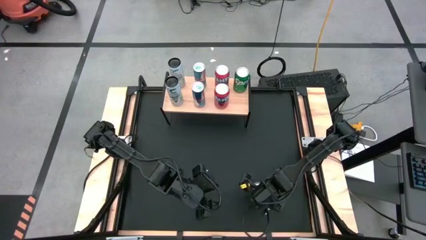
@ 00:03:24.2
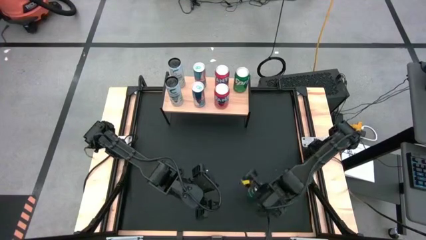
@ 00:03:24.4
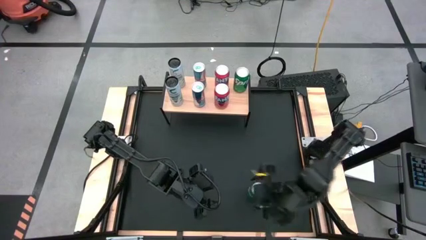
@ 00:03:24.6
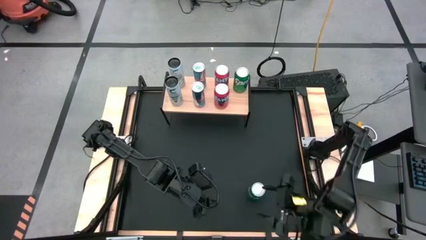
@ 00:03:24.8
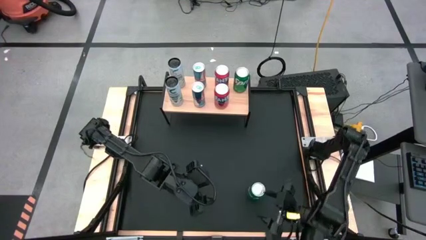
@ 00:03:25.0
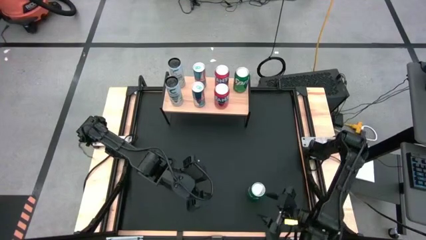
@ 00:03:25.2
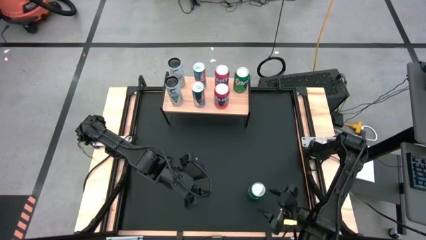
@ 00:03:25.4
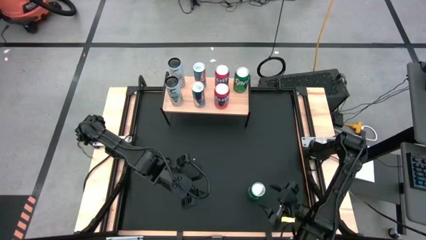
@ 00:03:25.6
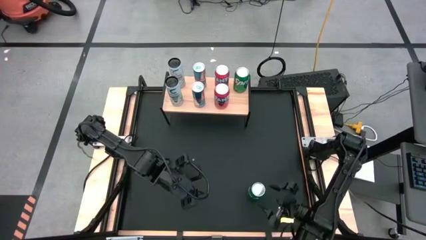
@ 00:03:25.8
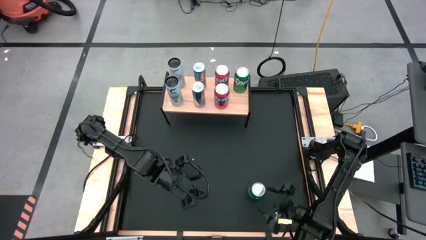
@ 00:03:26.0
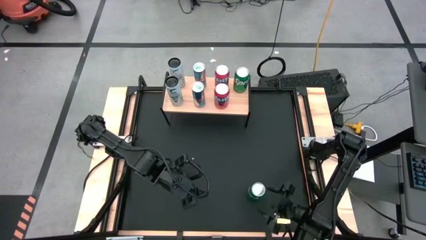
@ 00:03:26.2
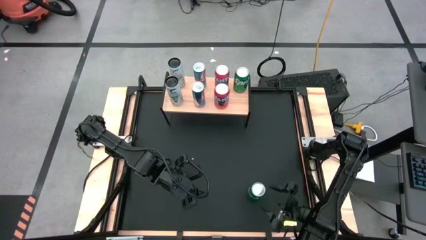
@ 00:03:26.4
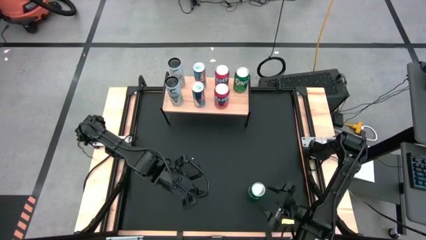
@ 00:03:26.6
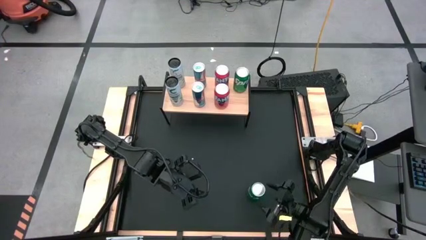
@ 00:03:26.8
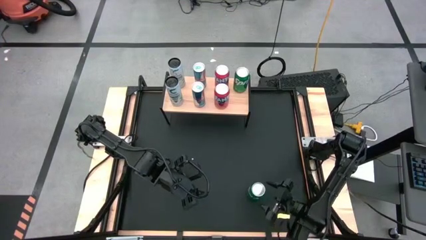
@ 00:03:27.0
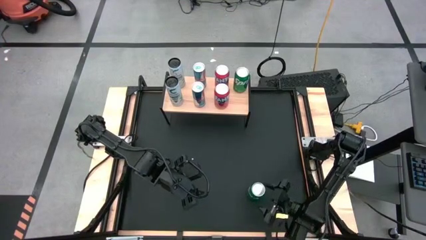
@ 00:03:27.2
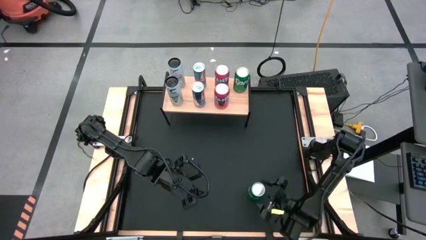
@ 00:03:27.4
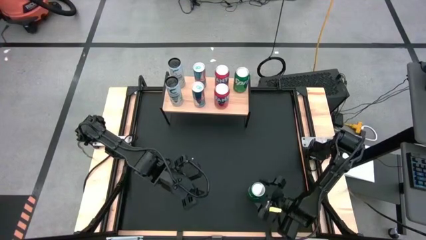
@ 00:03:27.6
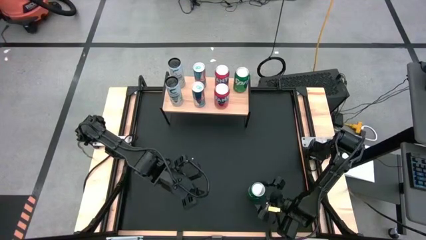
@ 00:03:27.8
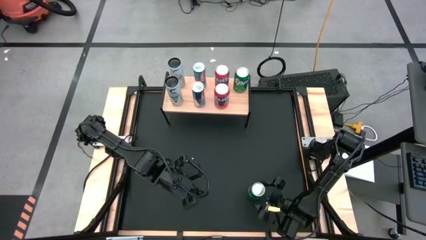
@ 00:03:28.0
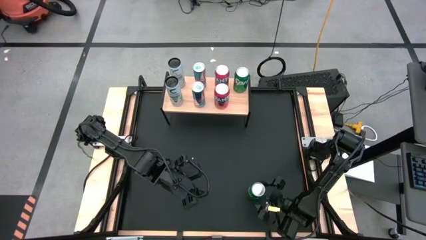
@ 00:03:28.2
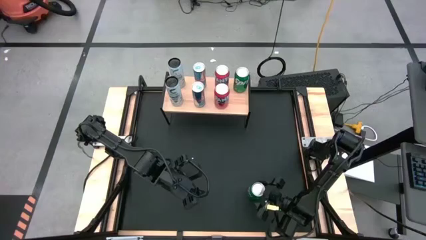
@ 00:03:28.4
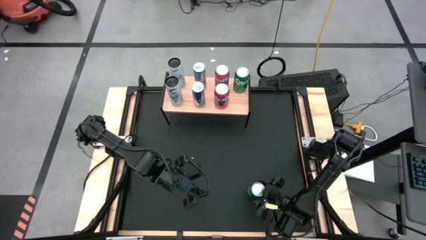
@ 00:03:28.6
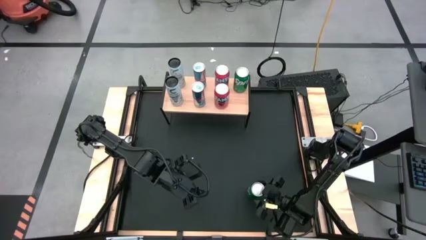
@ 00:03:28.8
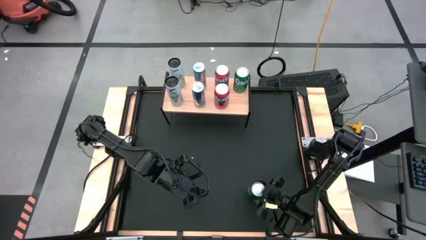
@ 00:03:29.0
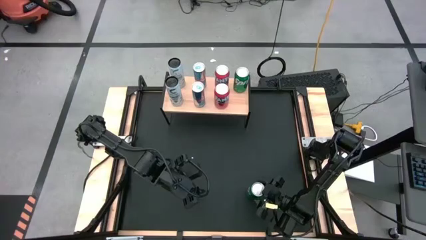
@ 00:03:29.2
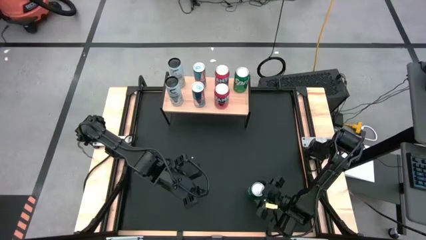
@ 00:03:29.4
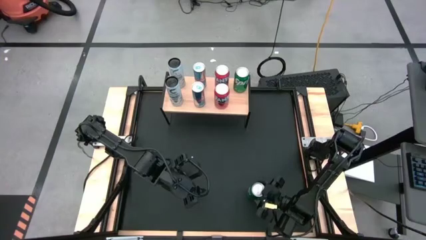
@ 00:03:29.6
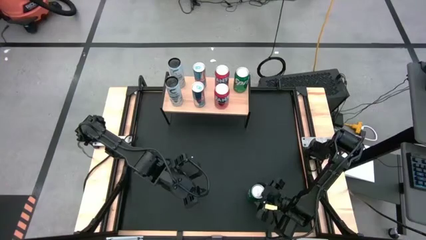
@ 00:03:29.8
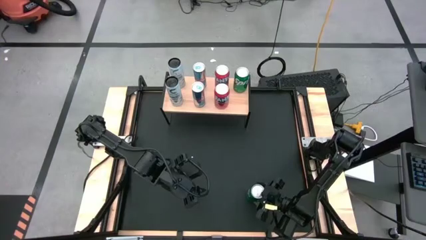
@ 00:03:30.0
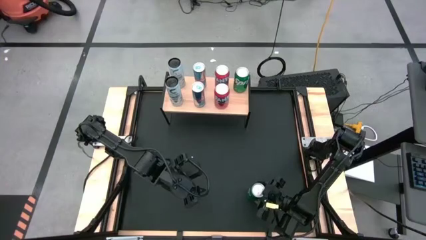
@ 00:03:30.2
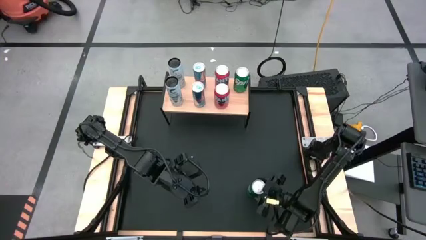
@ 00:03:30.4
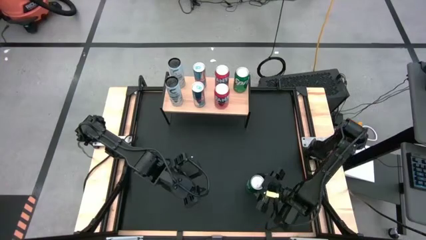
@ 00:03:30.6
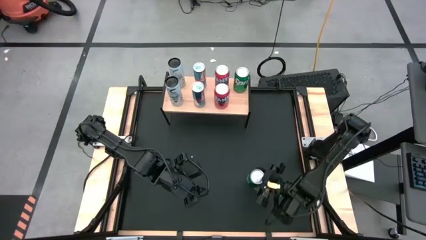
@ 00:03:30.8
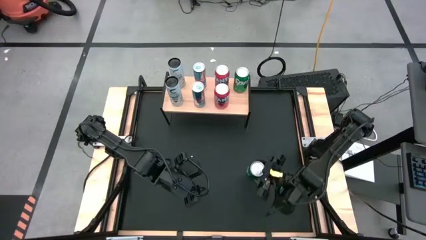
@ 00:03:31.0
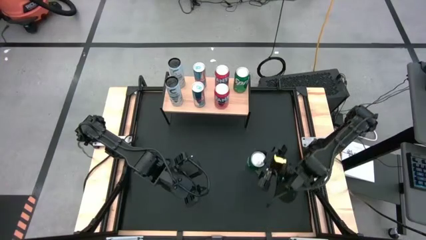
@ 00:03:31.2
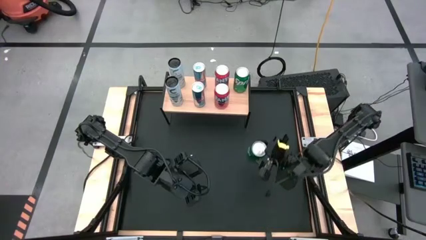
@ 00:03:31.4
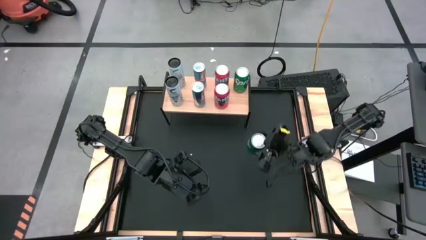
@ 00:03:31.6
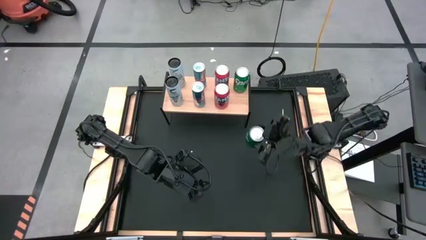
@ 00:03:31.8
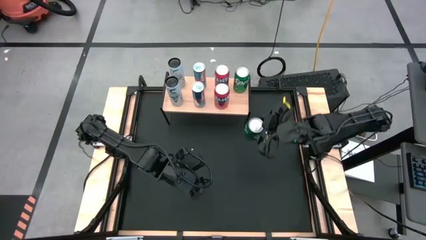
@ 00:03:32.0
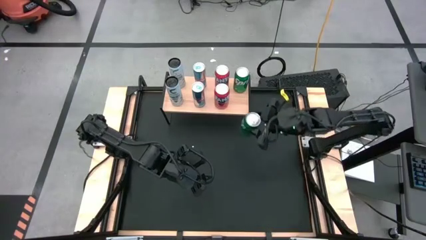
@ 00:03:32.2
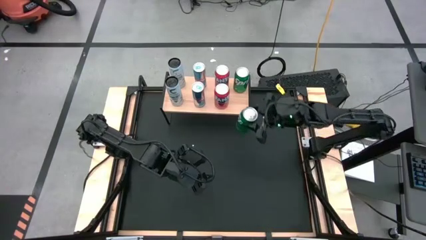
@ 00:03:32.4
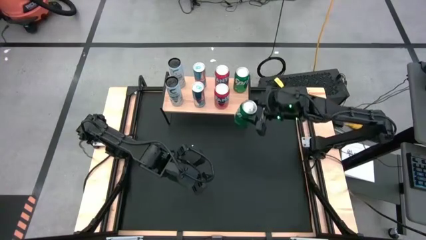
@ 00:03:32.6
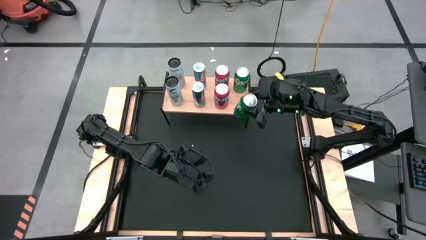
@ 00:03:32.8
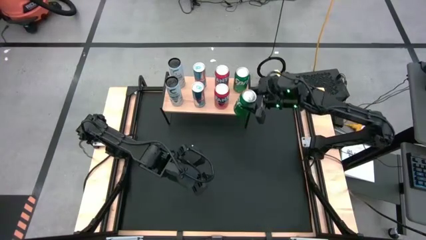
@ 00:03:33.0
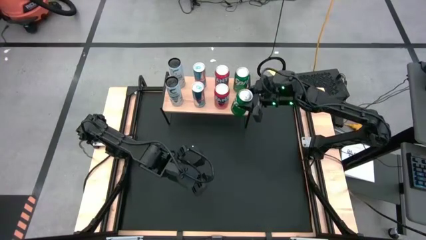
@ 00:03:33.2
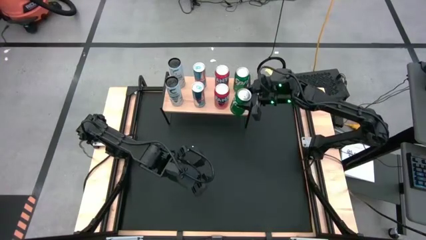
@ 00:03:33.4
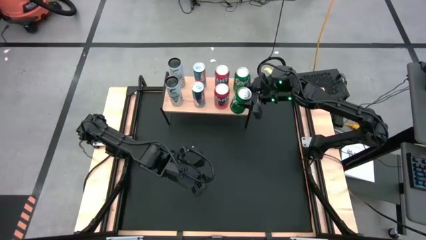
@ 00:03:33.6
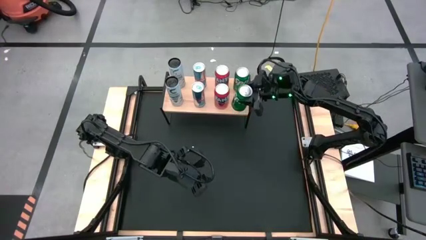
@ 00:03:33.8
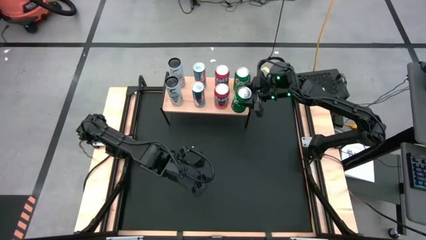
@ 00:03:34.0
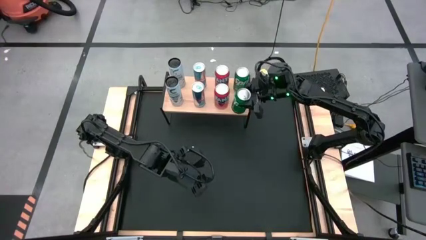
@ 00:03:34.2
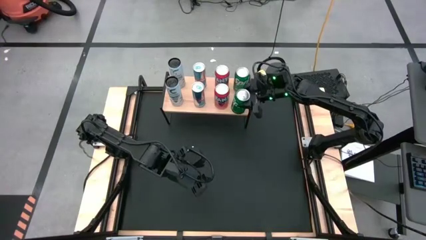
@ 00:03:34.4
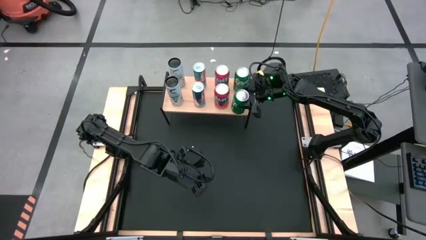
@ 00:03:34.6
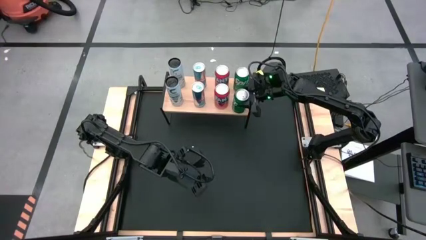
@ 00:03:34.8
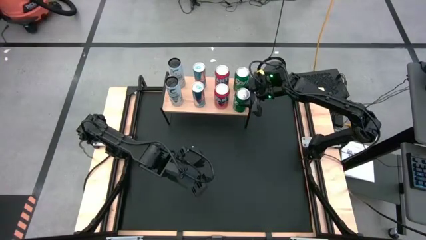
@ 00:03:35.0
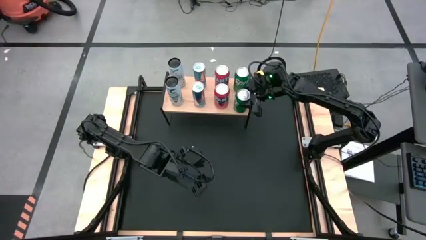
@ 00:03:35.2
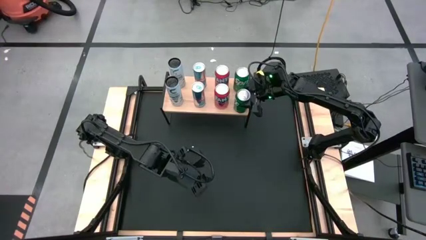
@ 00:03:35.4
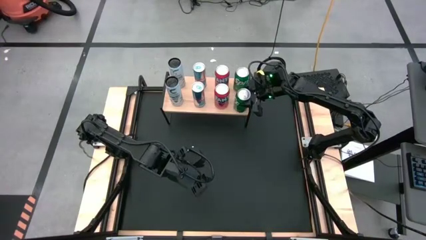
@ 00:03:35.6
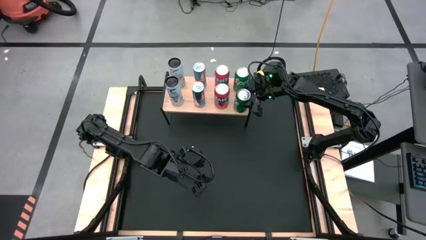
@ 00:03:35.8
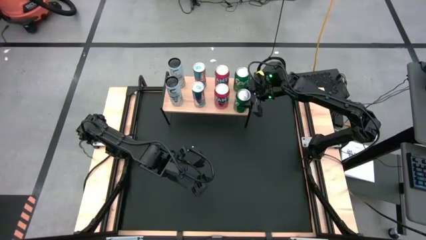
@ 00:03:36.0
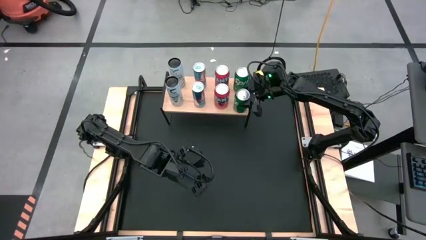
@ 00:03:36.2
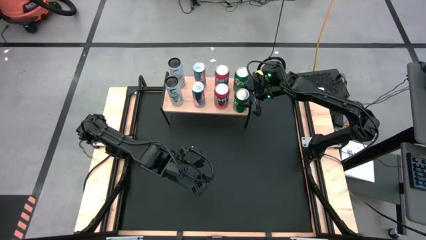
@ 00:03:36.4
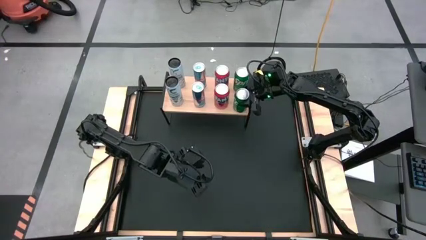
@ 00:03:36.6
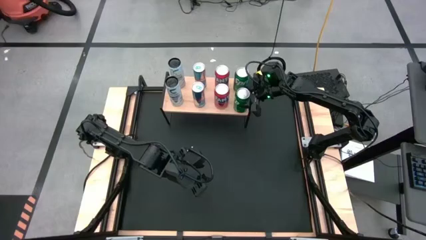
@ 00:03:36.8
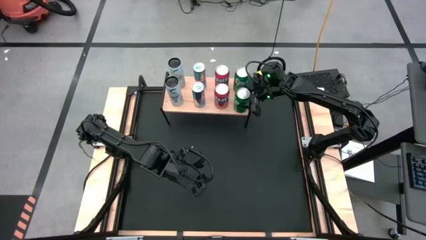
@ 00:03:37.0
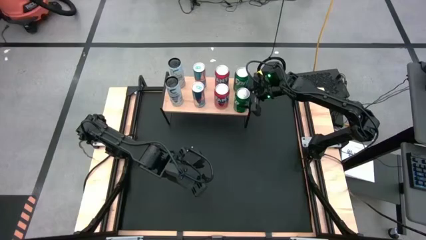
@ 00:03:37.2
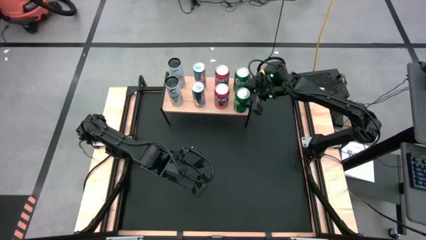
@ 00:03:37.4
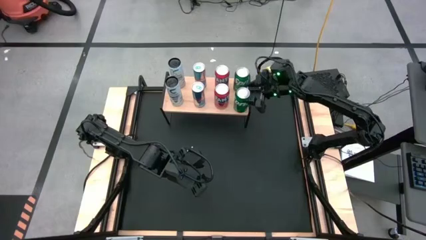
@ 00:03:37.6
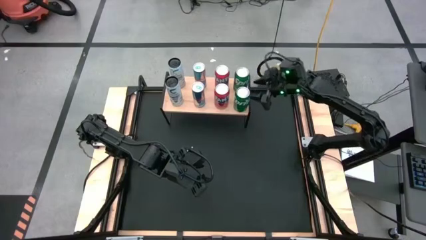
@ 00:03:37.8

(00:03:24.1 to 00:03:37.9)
Task: Place canned beverage on shelf
Put the green soda can, aligned with the other green soda can on the shelf

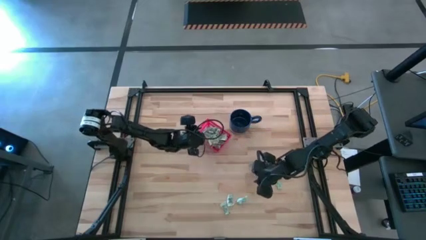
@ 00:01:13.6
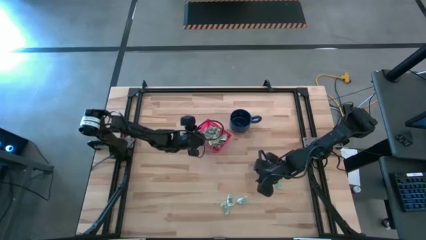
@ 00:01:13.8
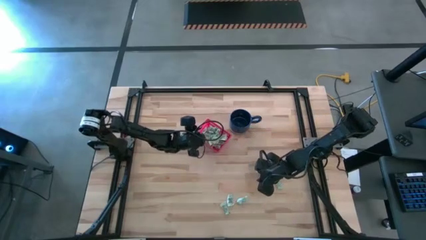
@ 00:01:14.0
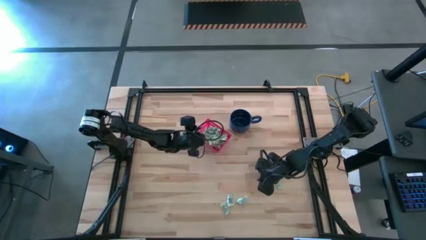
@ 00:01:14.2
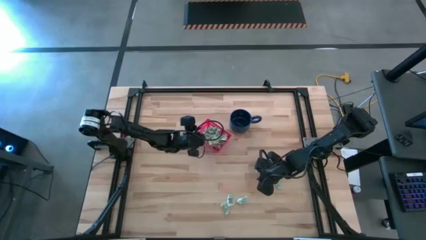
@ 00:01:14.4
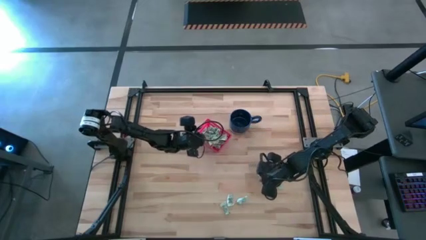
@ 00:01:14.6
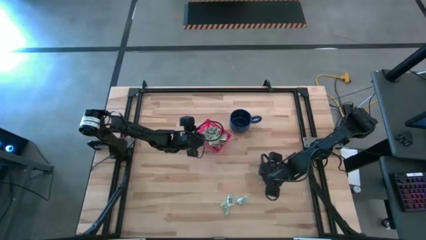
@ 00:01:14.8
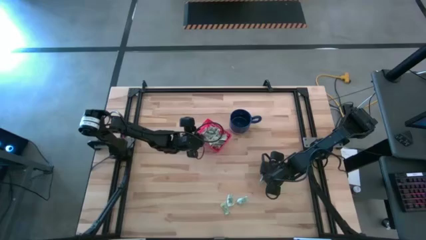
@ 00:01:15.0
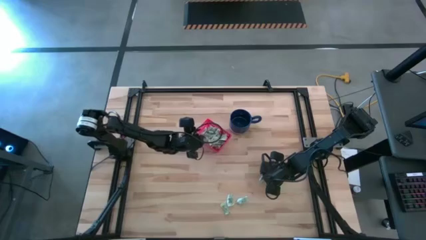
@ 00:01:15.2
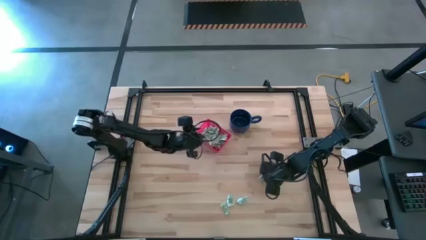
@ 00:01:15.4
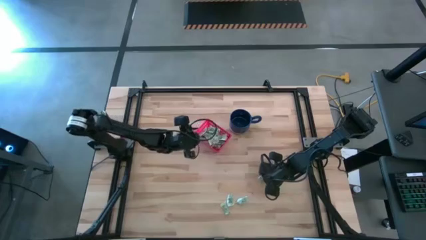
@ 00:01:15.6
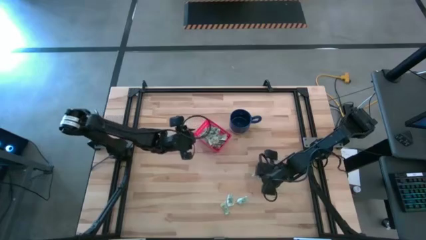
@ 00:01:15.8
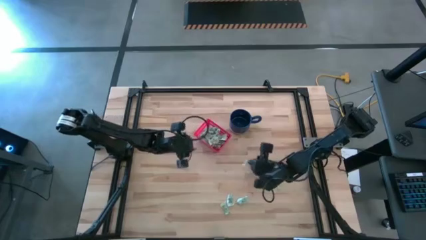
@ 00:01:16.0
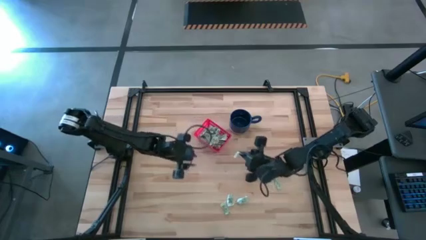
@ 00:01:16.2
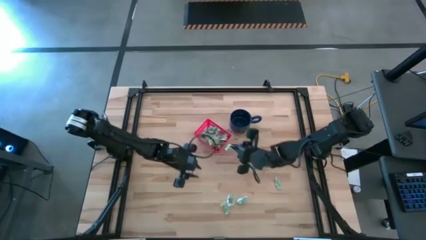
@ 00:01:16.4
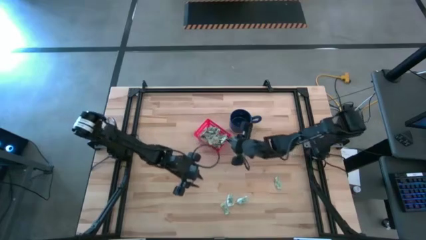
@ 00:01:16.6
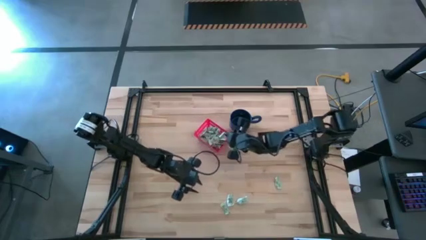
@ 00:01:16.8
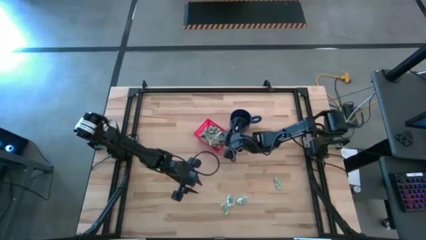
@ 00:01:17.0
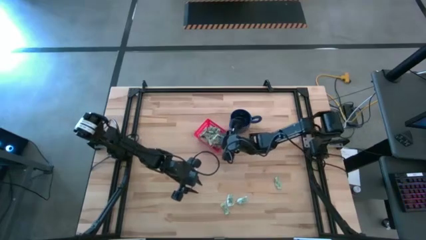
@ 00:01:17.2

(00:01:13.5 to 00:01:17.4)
Task: Pick and place items into bin
Put the stevia packet into the bin
